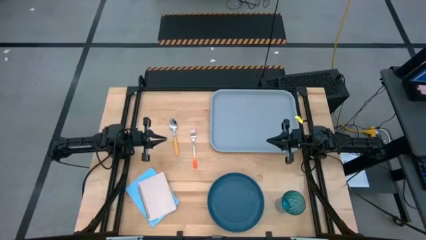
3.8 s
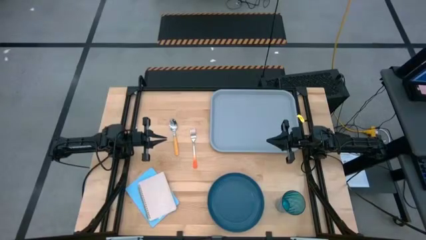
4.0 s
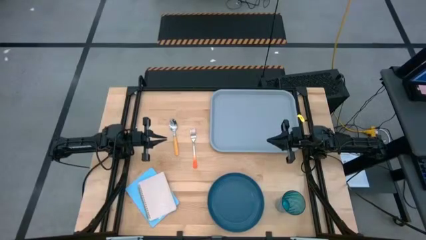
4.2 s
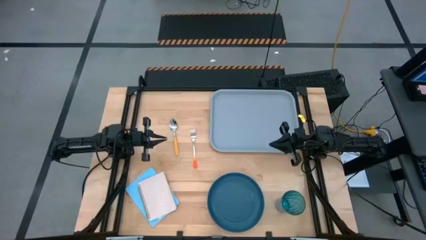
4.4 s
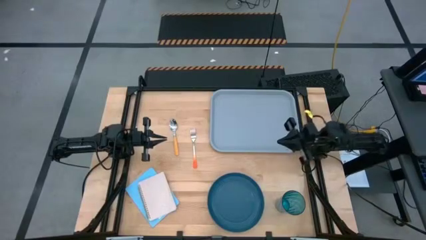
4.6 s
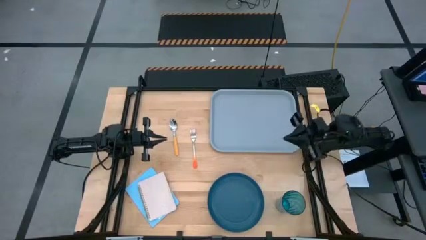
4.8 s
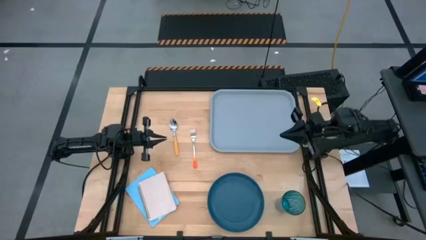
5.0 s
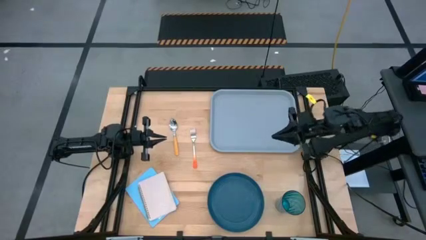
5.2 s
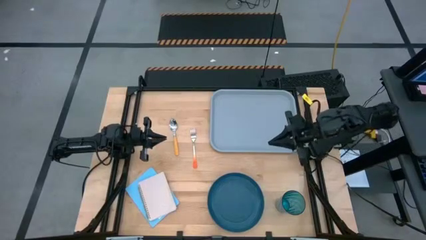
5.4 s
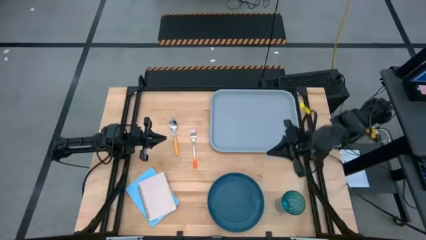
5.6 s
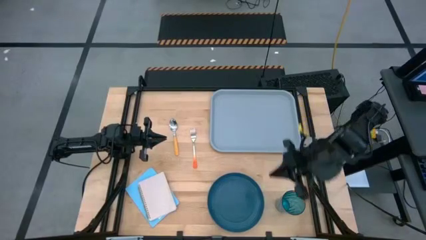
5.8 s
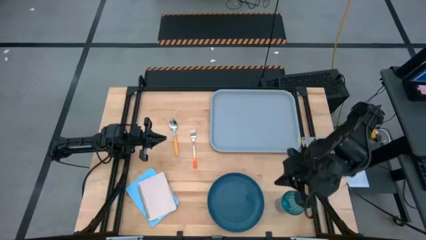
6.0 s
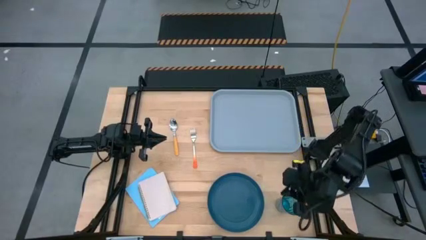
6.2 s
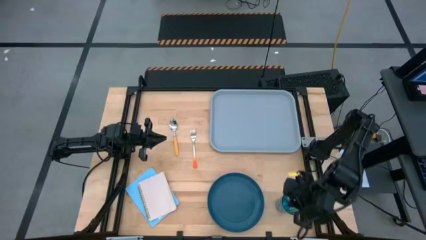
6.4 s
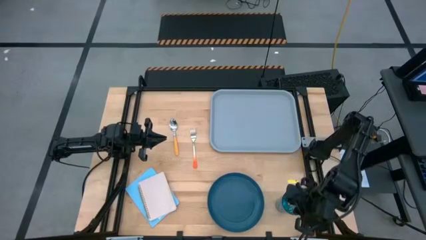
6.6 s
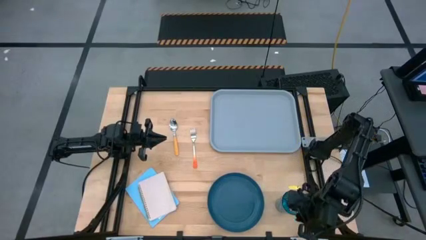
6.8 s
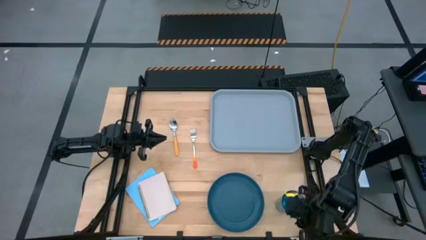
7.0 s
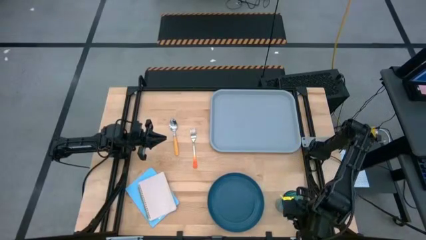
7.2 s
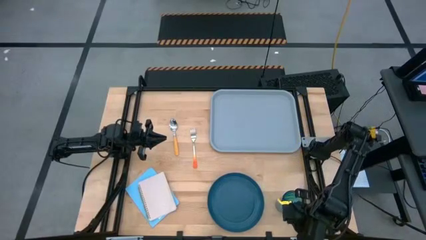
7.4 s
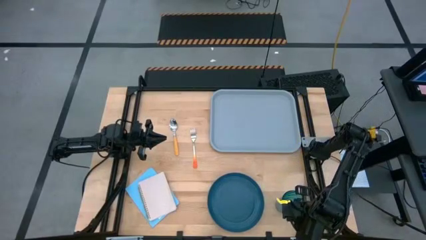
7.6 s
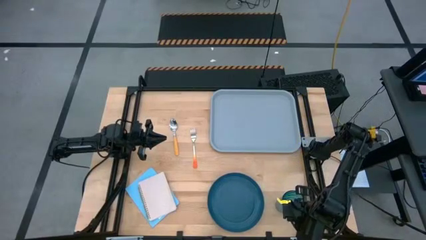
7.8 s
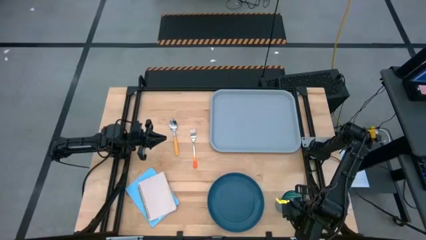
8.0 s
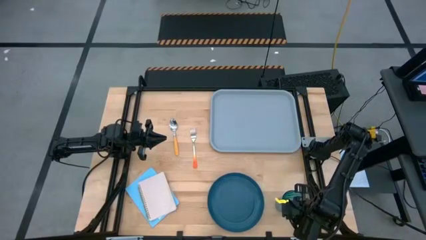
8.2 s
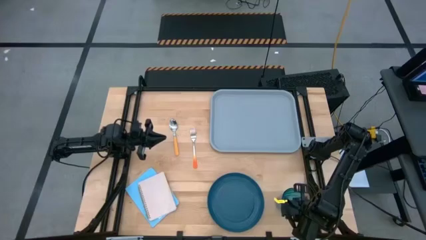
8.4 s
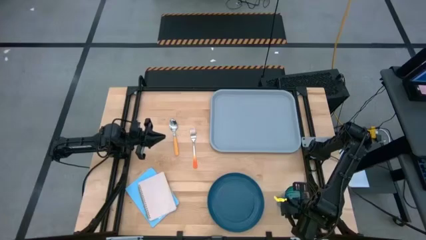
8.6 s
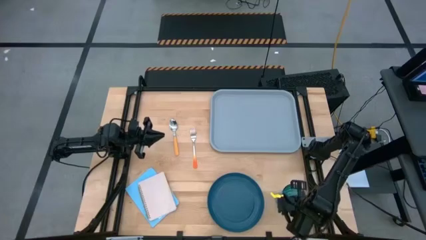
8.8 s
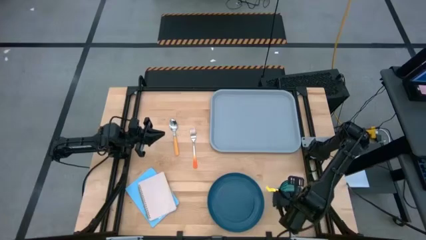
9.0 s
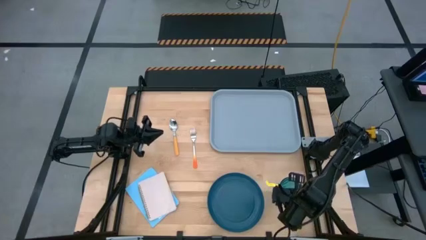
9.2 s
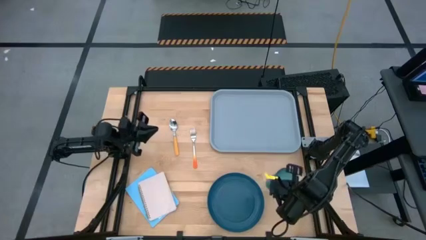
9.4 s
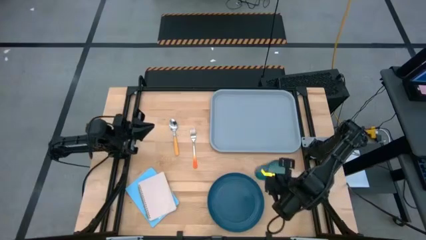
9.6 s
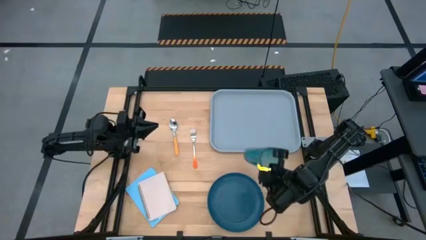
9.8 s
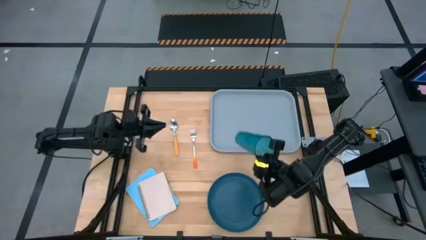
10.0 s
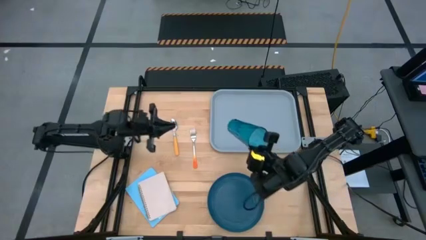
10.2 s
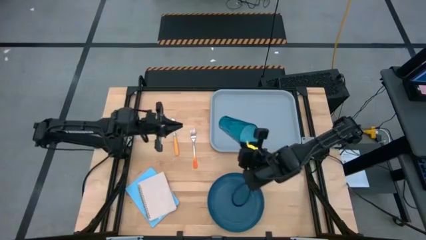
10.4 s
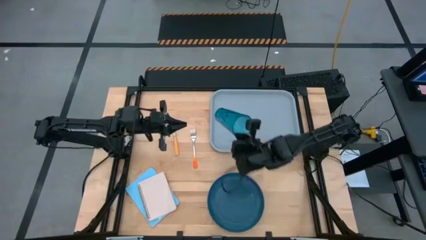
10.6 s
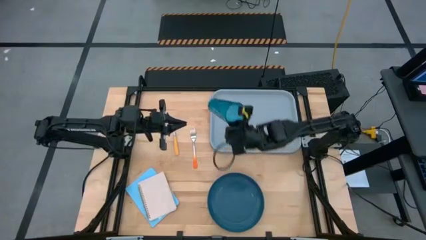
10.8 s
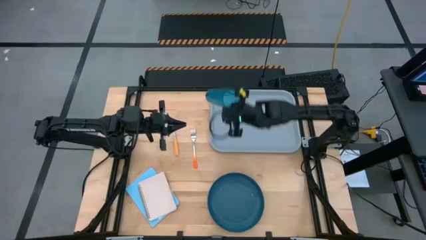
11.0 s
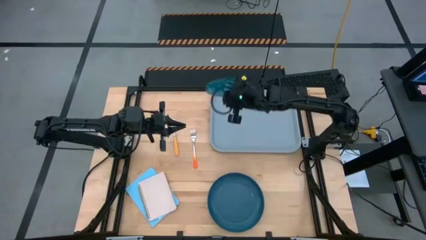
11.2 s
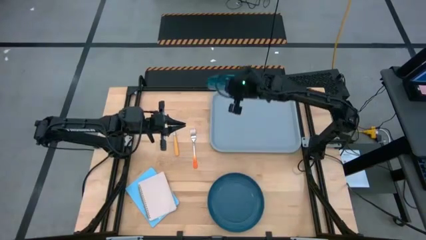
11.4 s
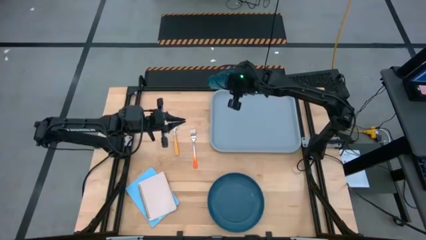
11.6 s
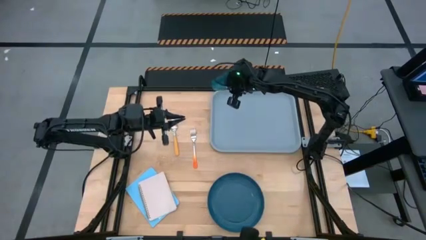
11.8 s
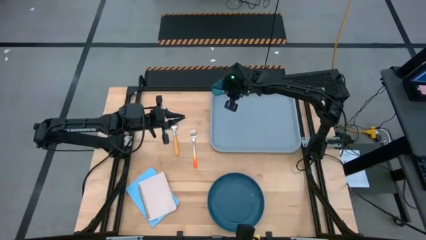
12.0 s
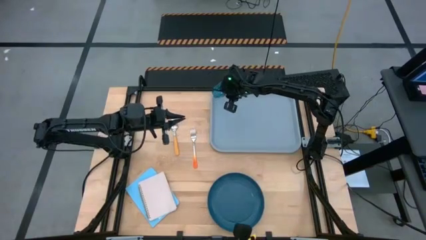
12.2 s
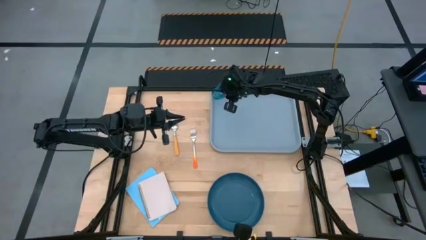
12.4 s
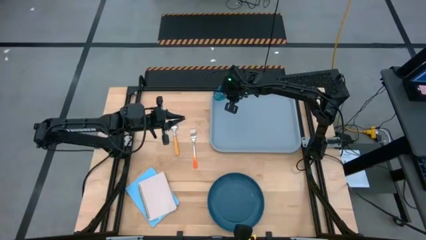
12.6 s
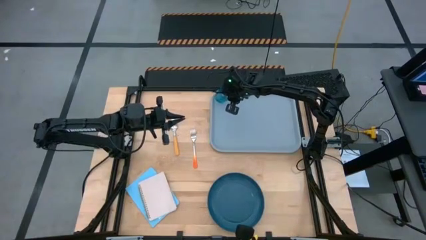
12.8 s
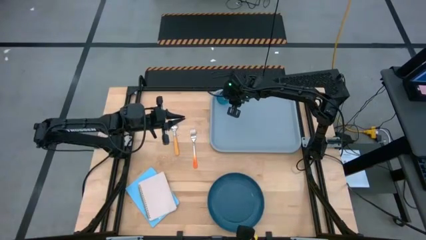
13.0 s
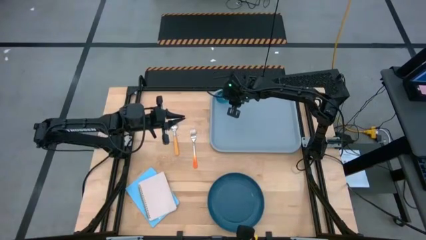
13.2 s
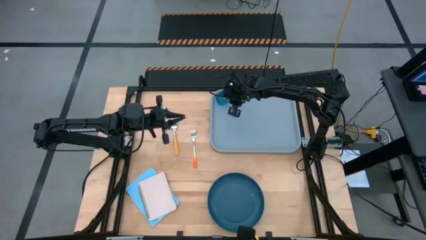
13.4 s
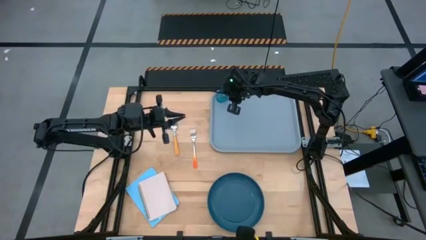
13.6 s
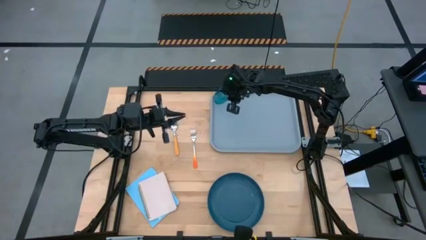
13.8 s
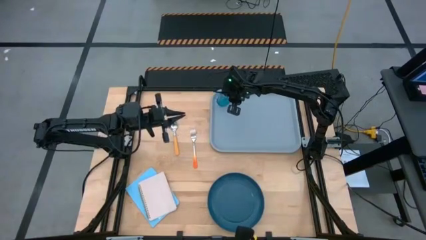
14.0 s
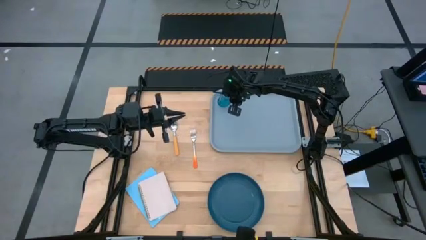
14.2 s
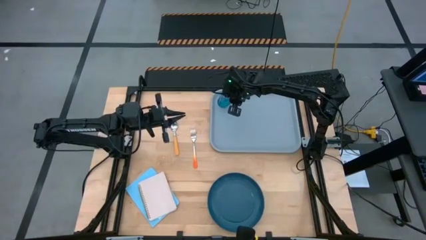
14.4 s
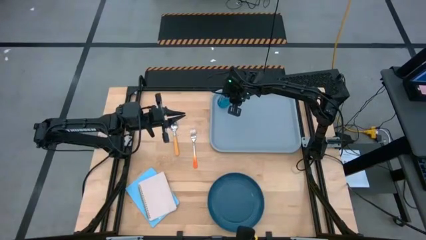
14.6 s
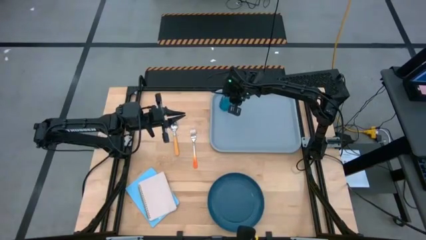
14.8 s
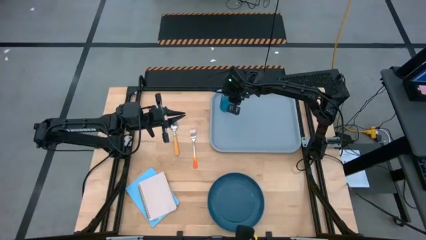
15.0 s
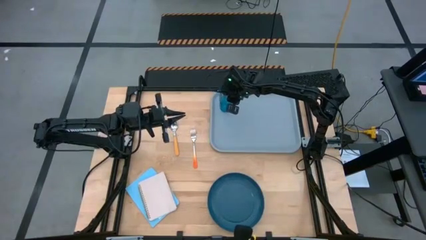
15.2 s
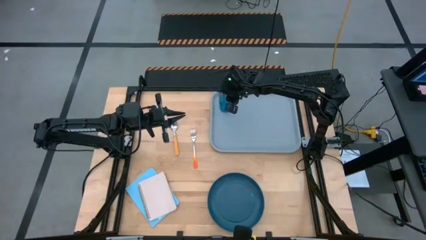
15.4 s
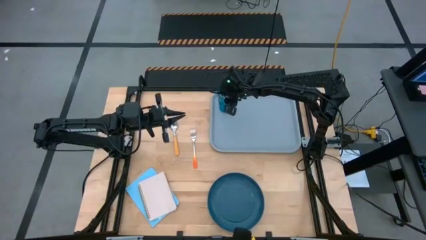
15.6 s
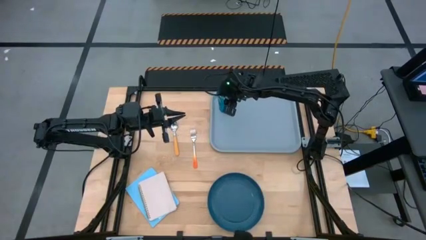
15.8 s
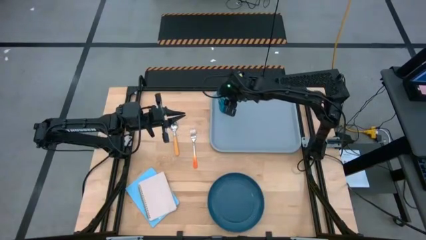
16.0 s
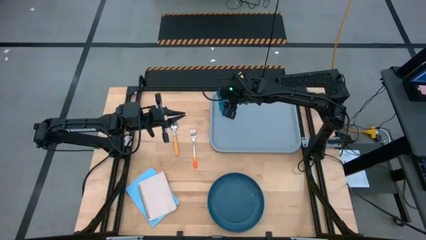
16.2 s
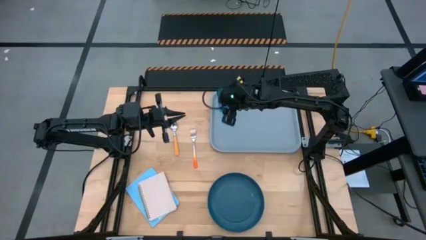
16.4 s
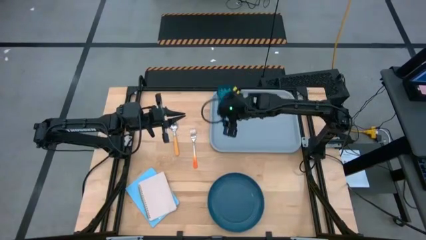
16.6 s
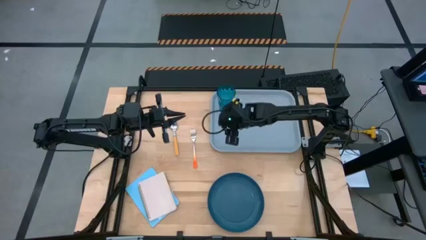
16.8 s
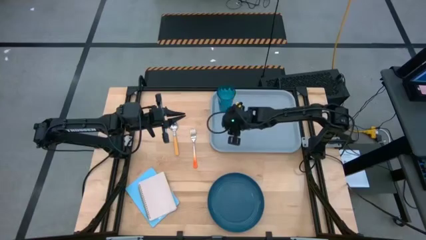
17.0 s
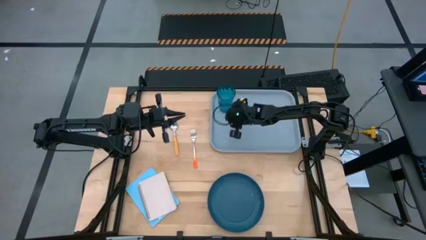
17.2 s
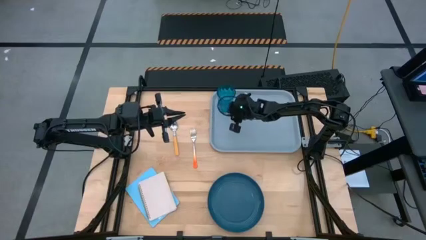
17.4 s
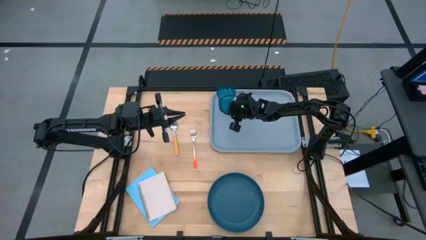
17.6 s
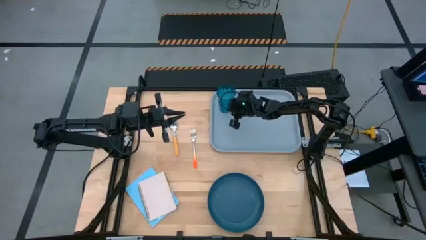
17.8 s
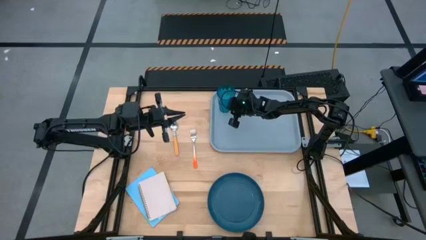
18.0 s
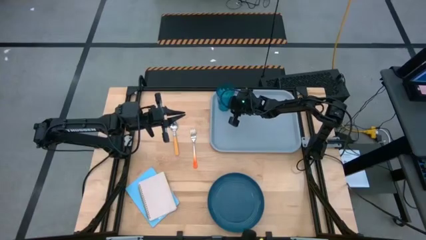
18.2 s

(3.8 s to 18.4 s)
Task: Pick and place plate/cup/fork/spoon on tray
Put the blue glass on the gray tray
